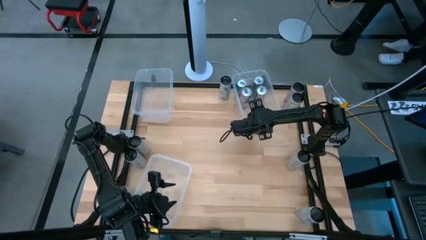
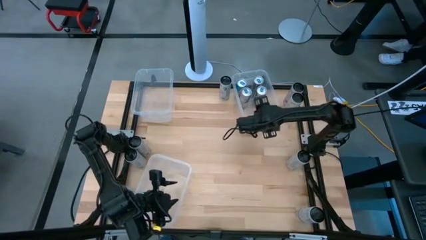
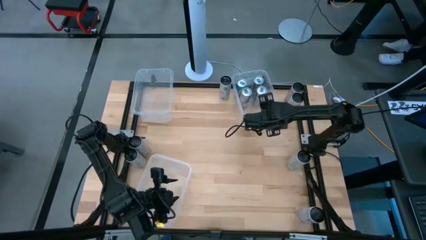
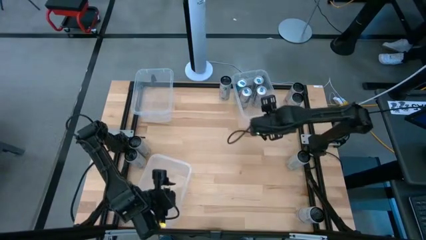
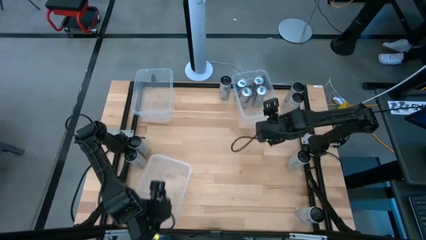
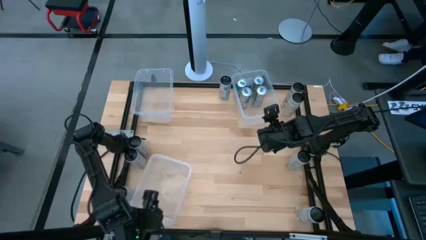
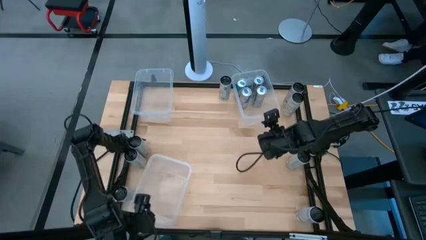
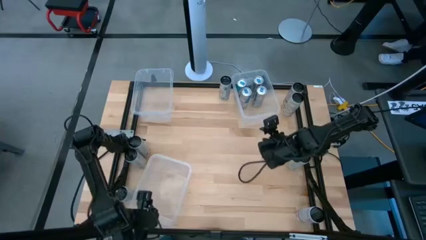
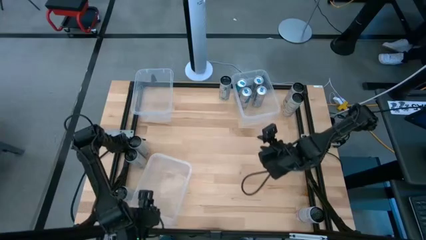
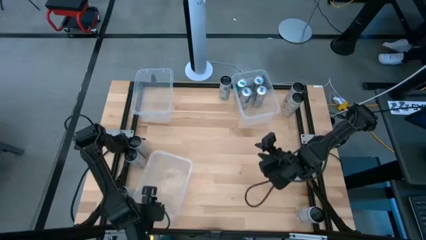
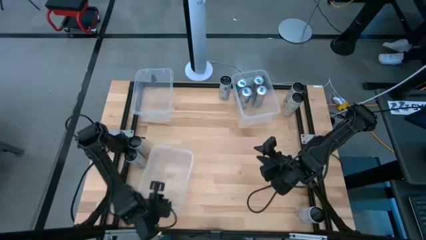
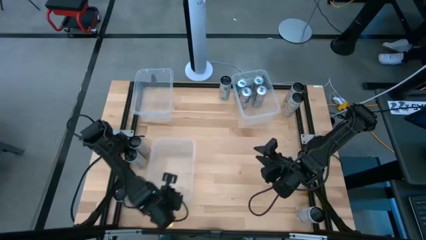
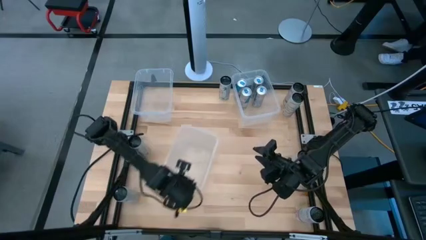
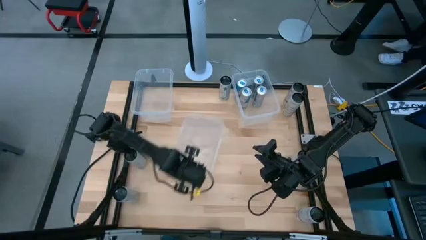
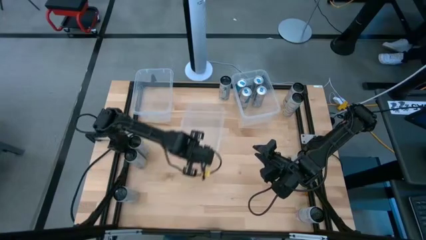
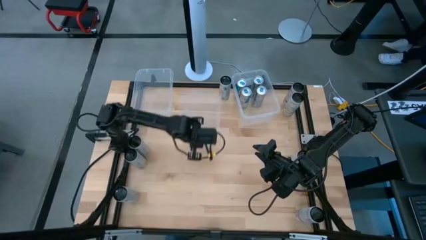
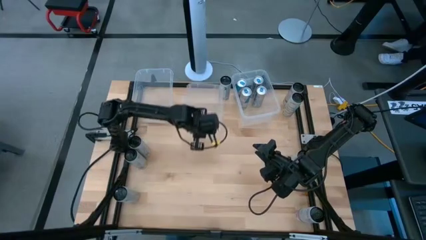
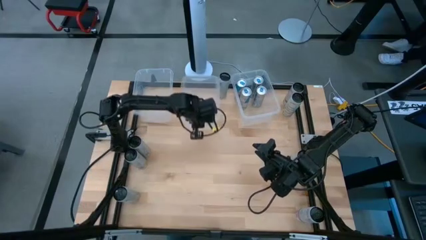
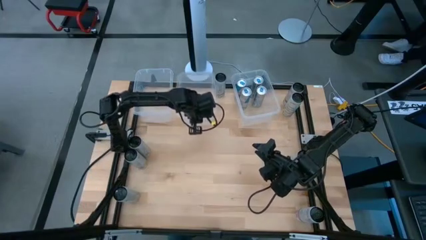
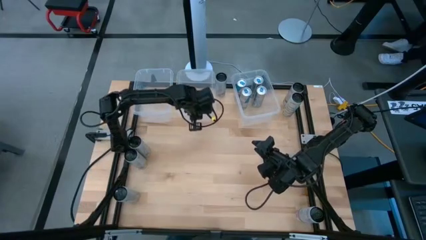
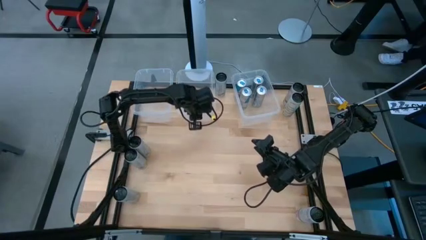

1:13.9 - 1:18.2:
Task: Sort soda cans
Move the bottom left transparent bin to the top center of the table

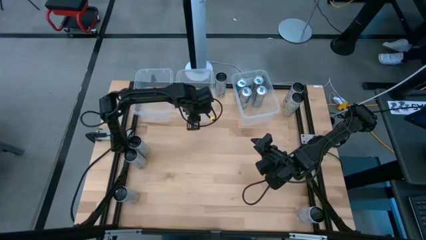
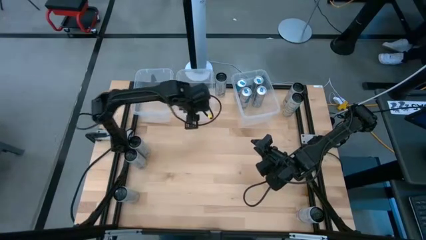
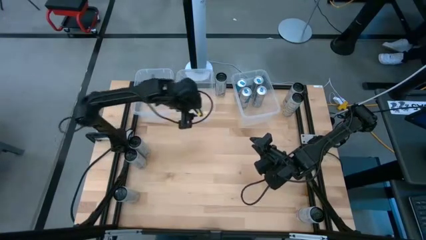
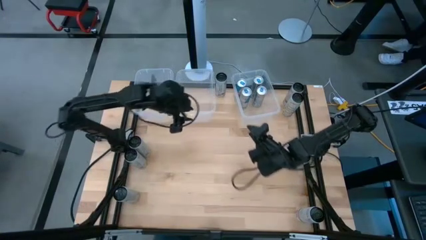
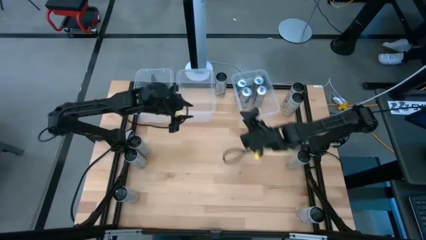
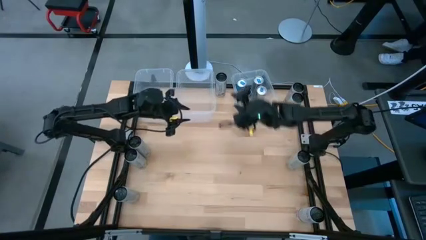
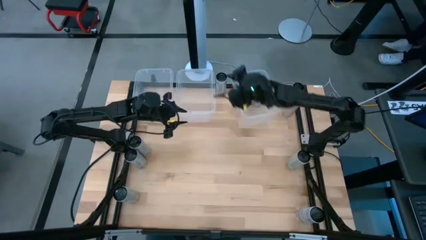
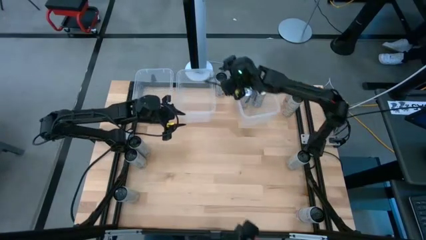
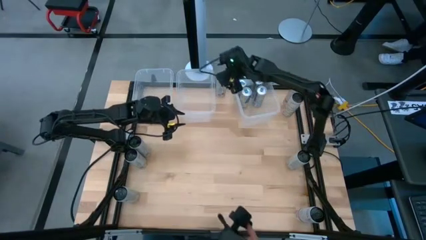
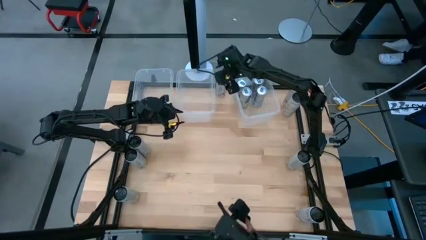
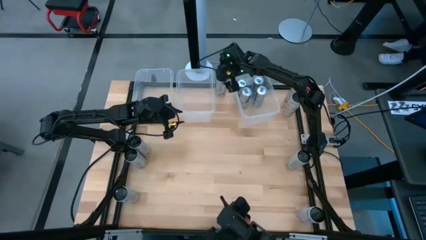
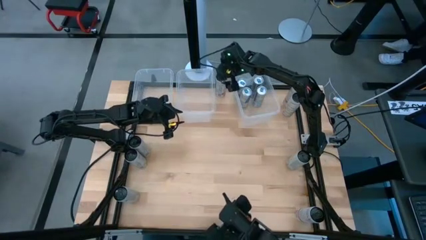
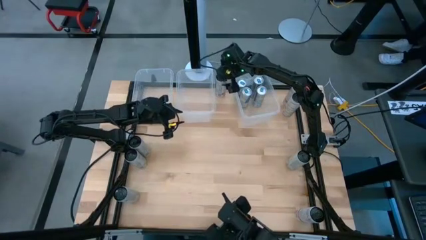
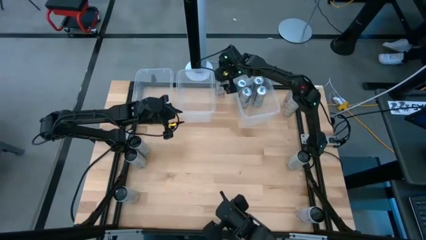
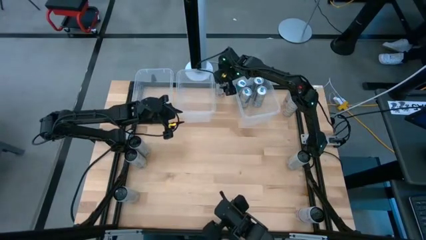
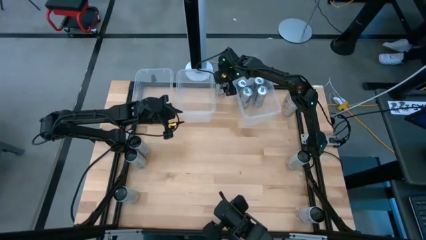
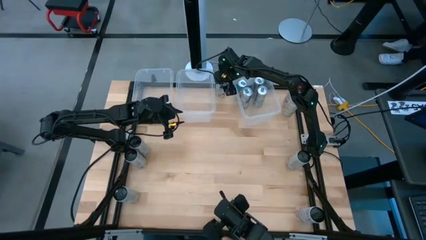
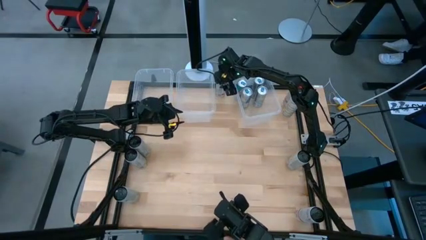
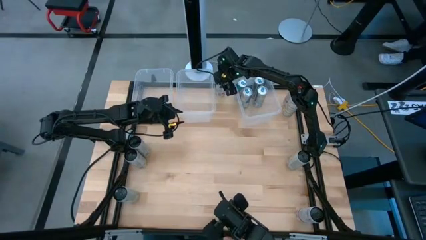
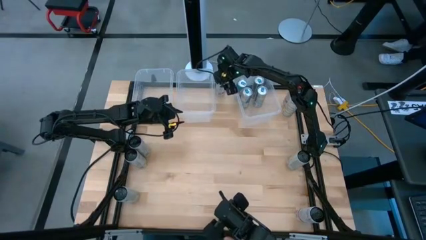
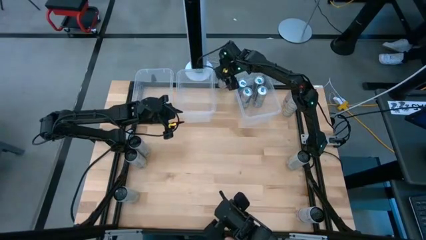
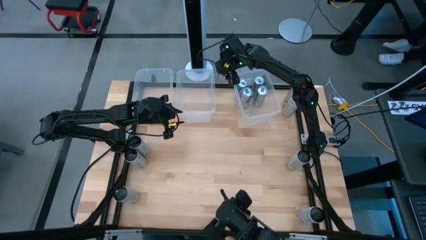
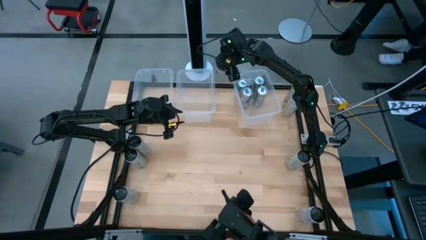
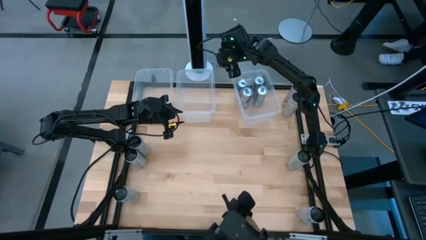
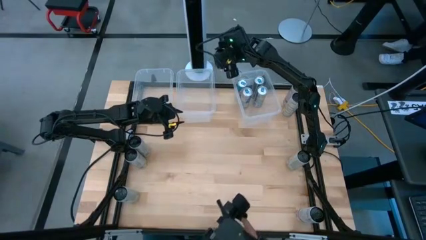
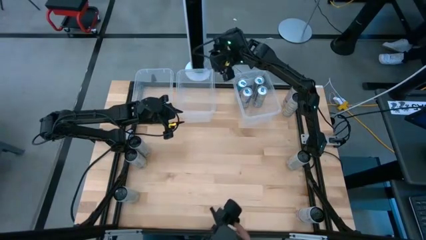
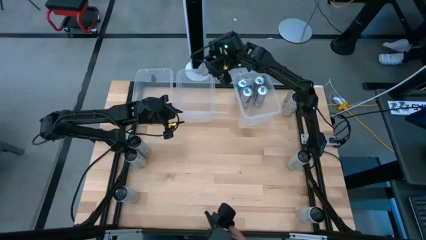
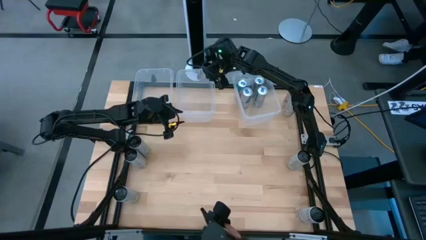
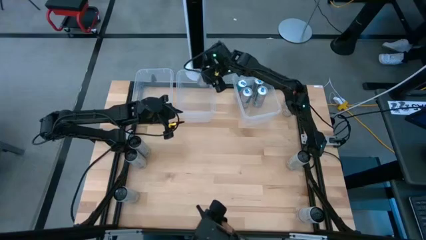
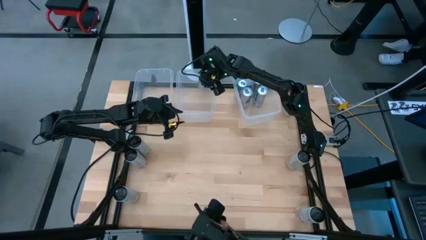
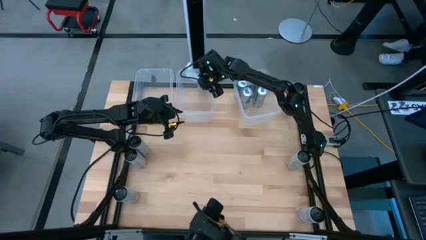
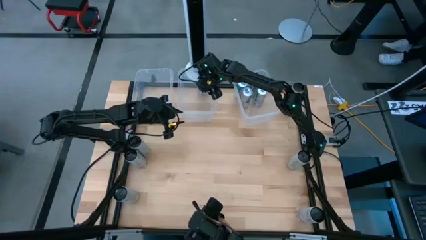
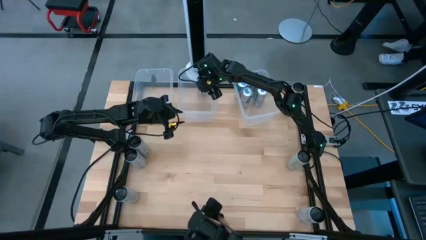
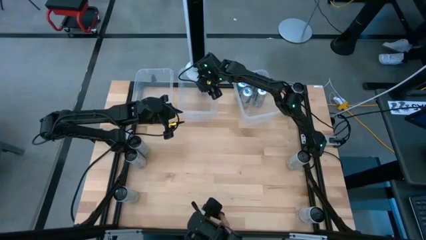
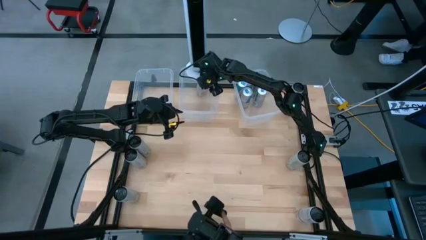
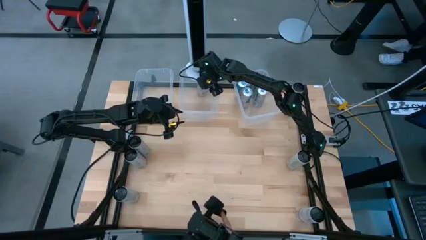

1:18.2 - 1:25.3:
Put the top center white-pink soda can into the top center transparent bin
